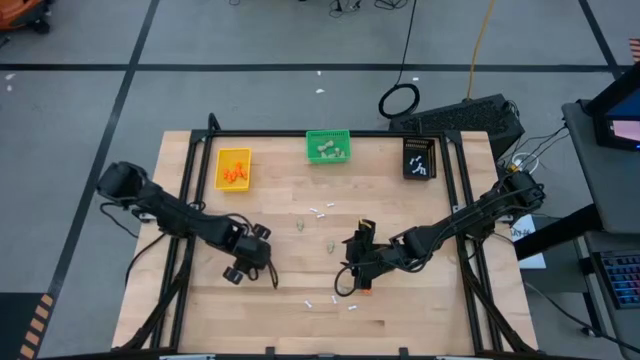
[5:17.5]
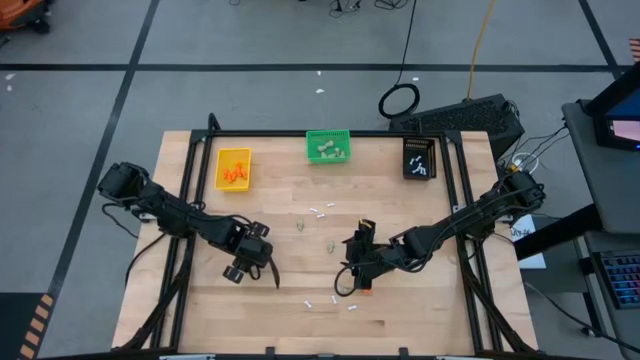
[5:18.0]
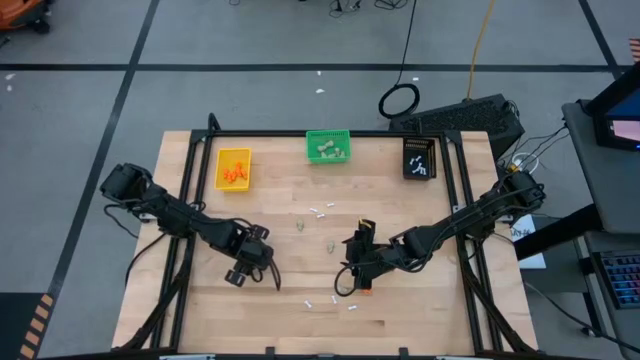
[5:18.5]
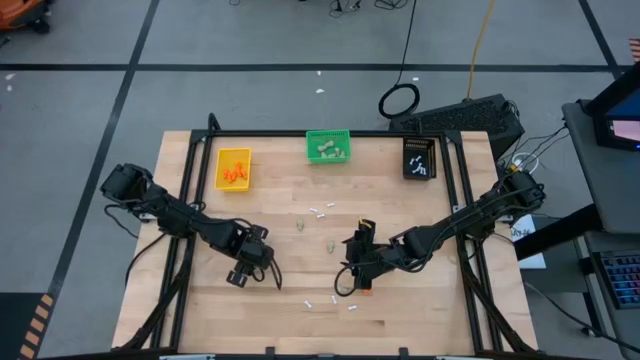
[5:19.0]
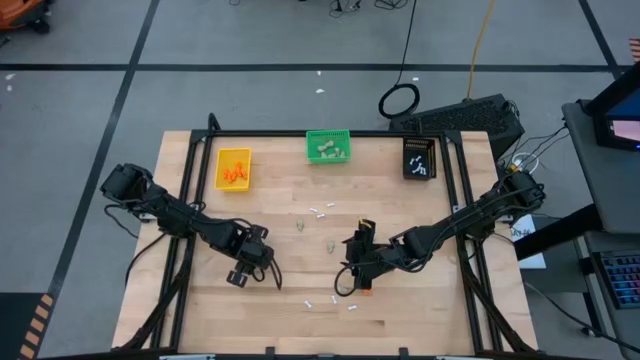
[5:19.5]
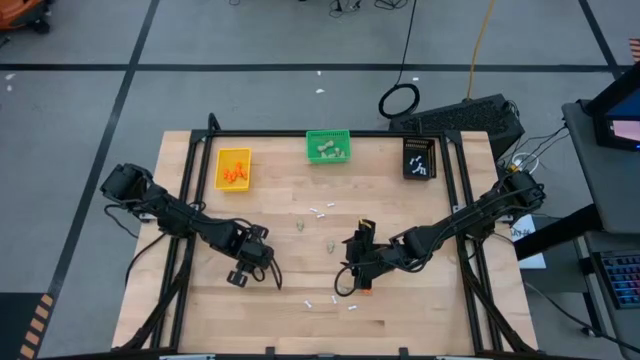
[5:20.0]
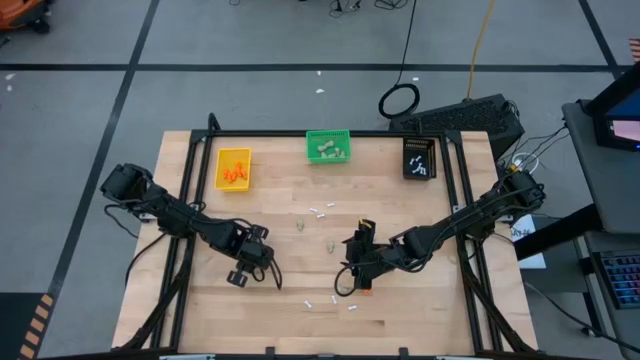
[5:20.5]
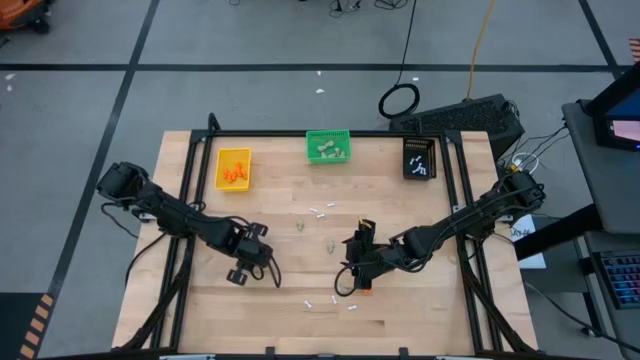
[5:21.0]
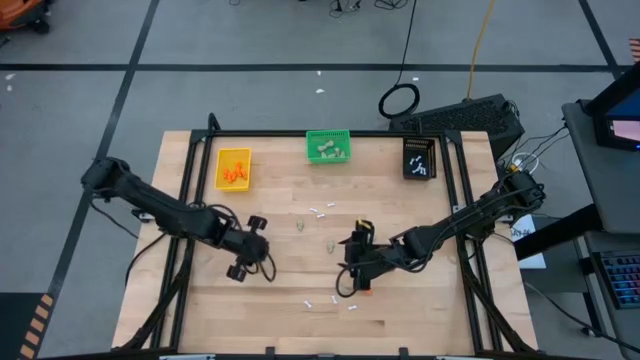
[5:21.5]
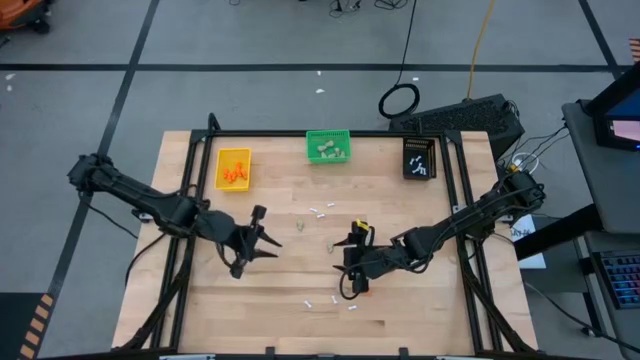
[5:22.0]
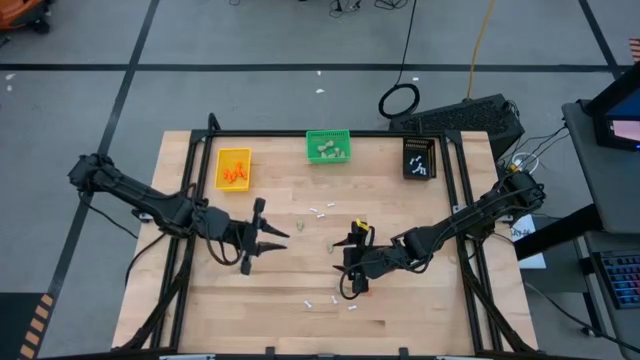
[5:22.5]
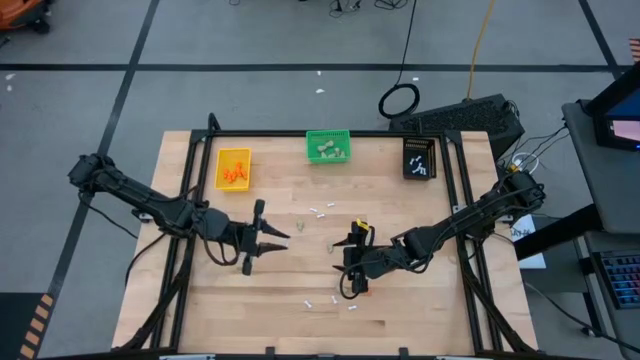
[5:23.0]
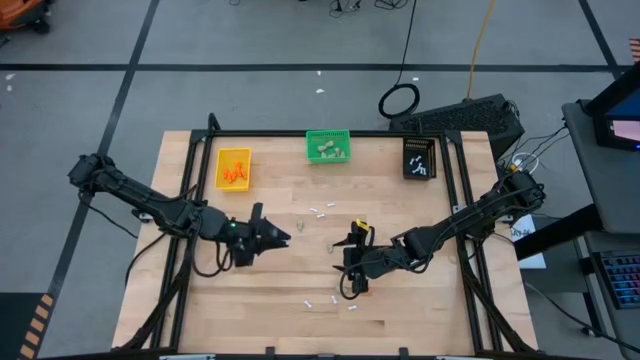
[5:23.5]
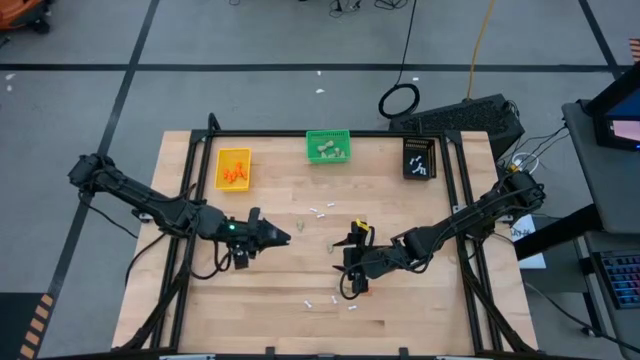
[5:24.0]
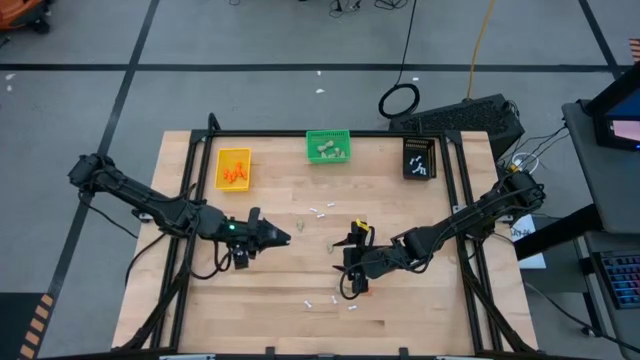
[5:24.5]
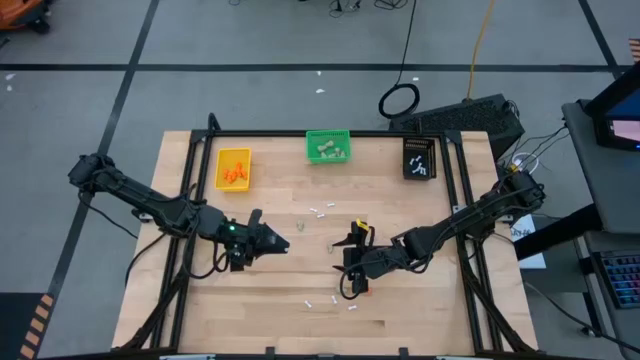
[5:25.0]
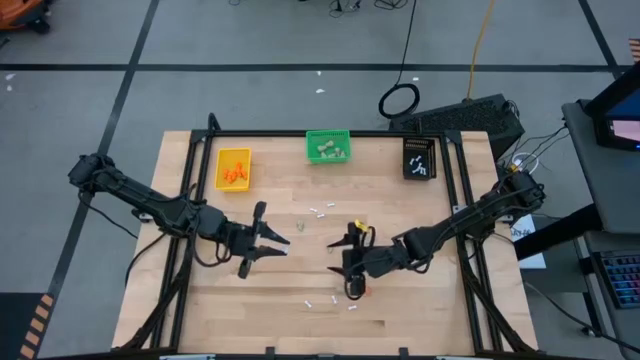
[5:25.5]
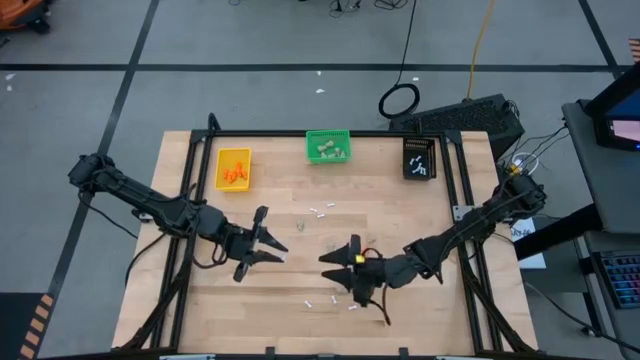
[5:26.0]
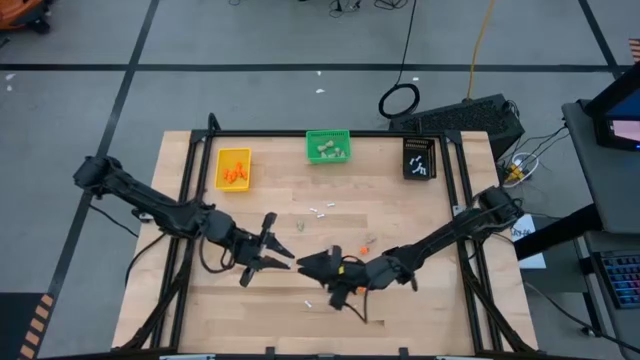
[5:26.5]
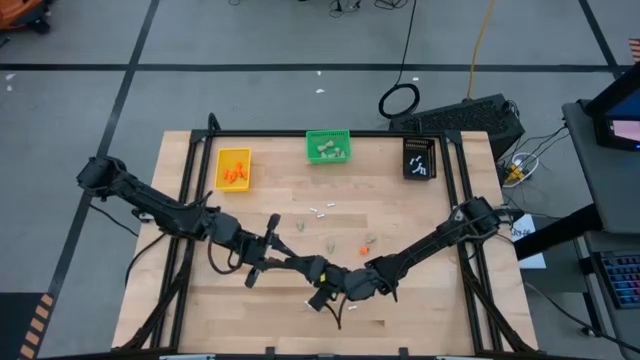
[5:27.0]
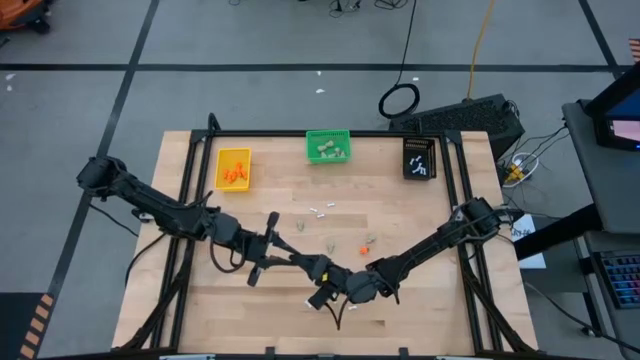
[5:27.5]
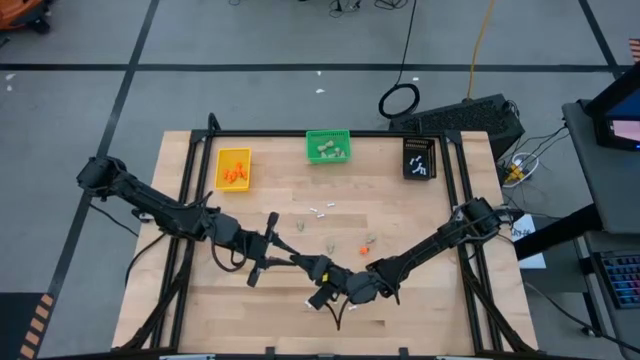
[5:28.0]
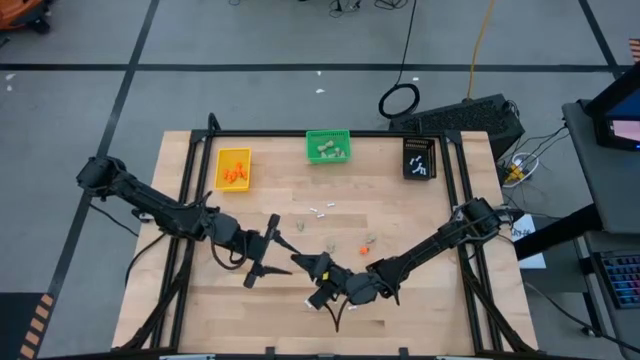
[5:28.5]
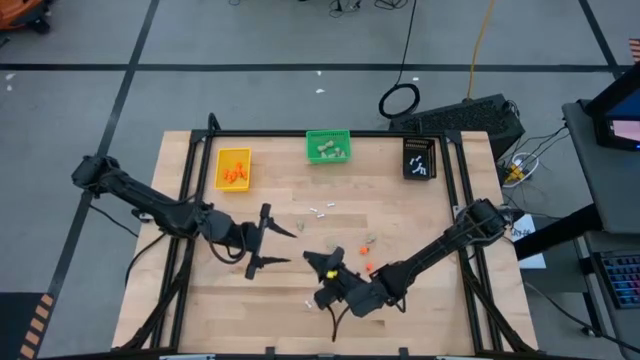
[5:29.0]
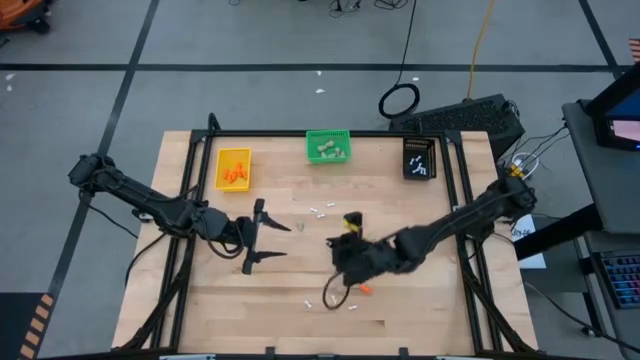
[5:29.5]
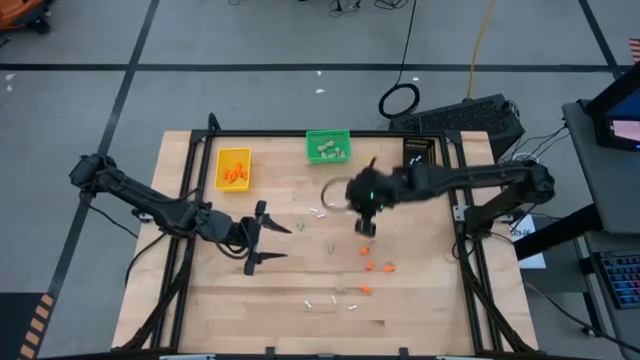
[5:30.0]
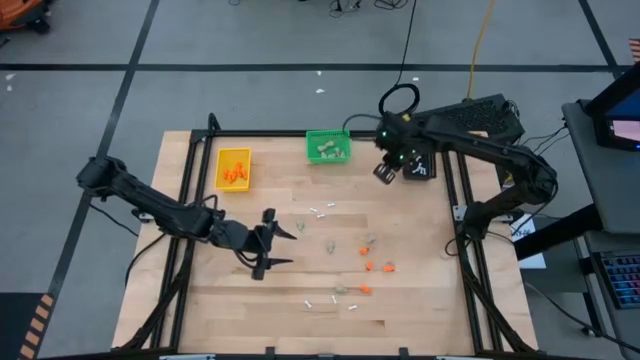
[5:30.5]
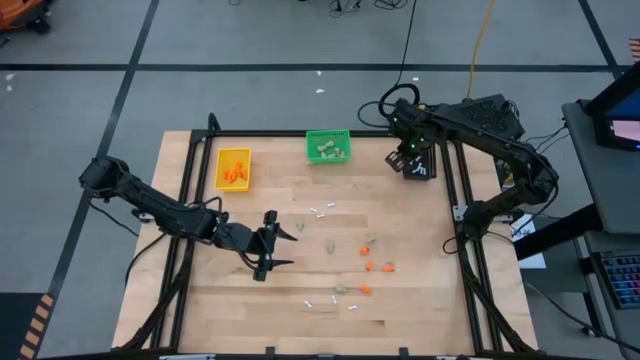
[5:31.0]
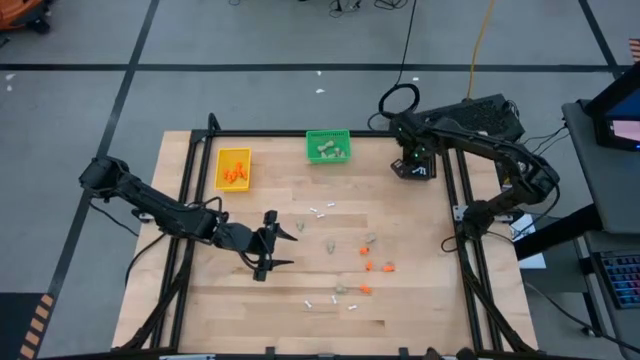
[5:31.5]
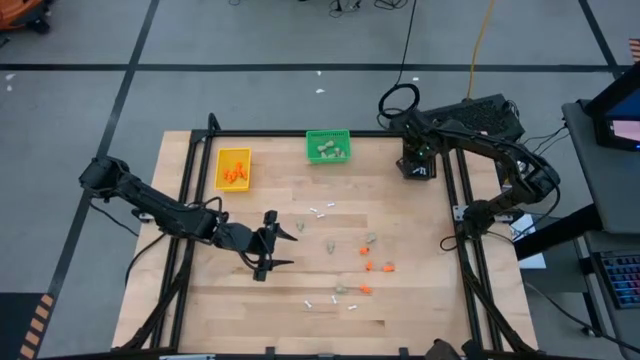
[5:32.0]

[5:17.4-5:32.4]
Task: Sort Halloween decoration
Put the white bone toy into the black bin

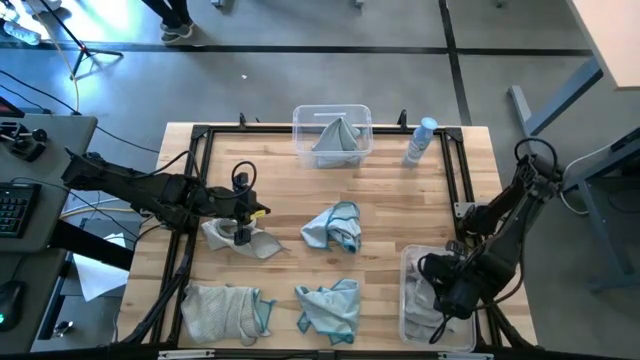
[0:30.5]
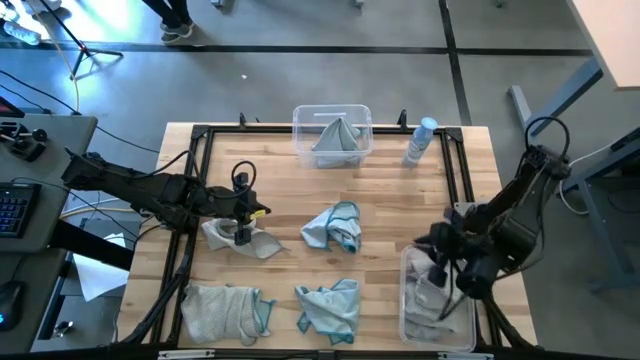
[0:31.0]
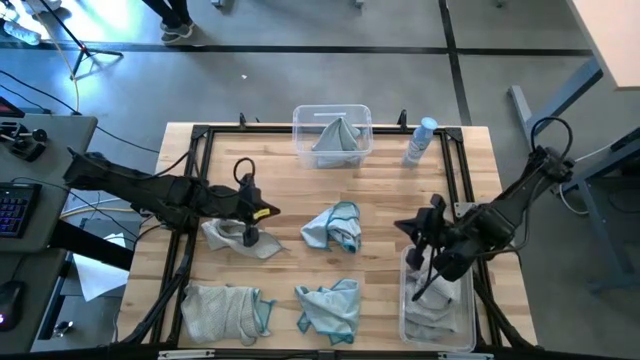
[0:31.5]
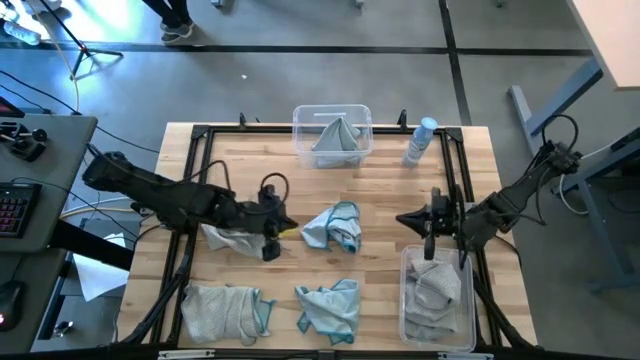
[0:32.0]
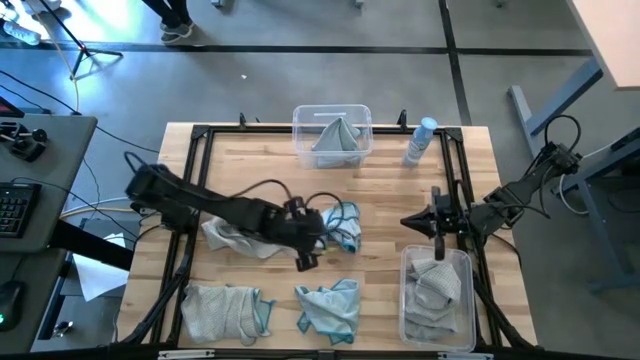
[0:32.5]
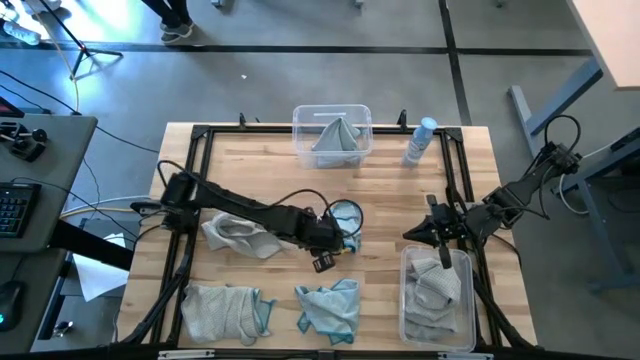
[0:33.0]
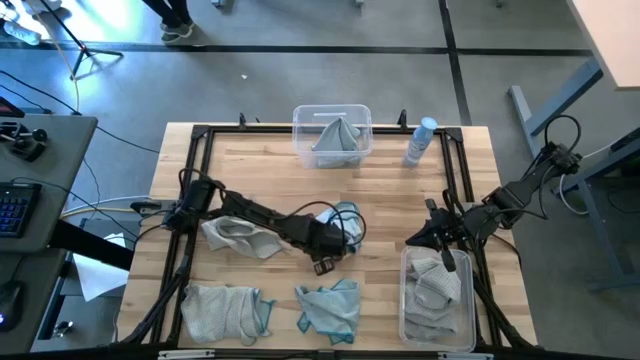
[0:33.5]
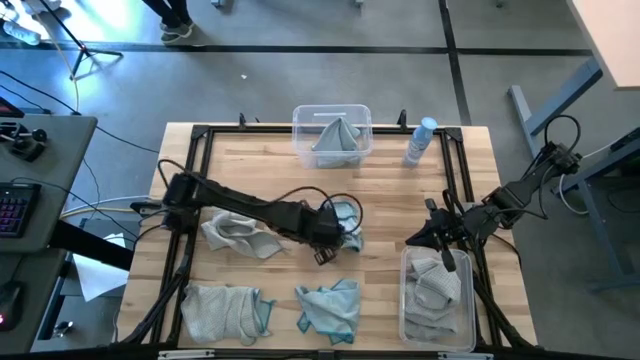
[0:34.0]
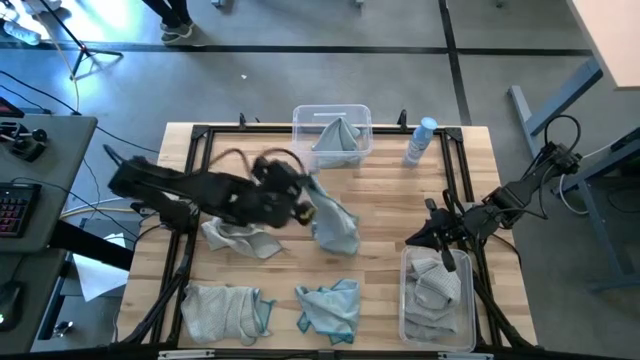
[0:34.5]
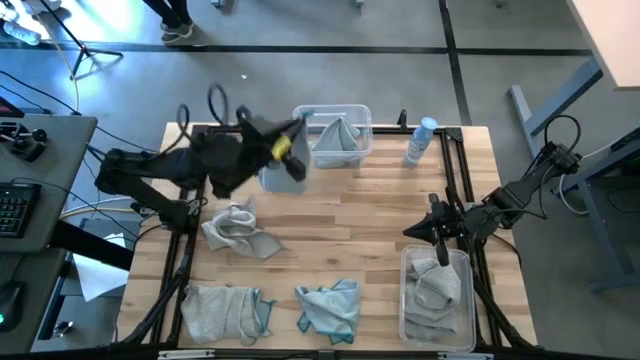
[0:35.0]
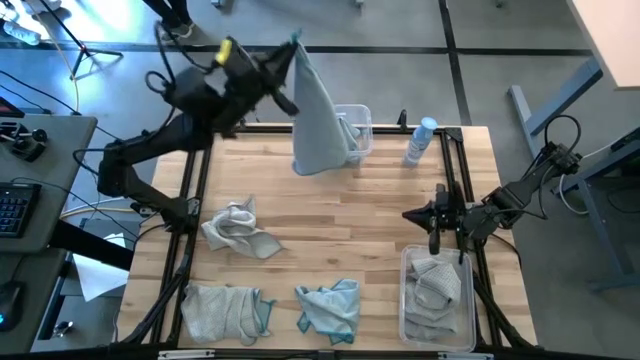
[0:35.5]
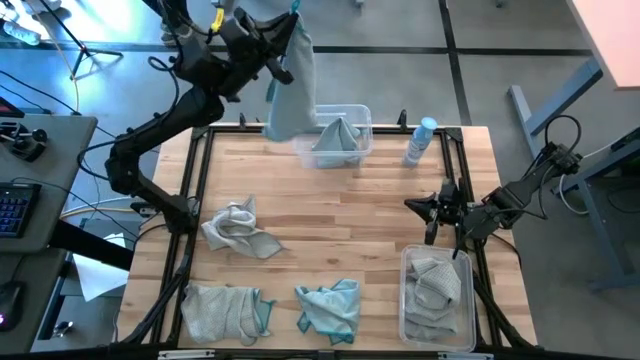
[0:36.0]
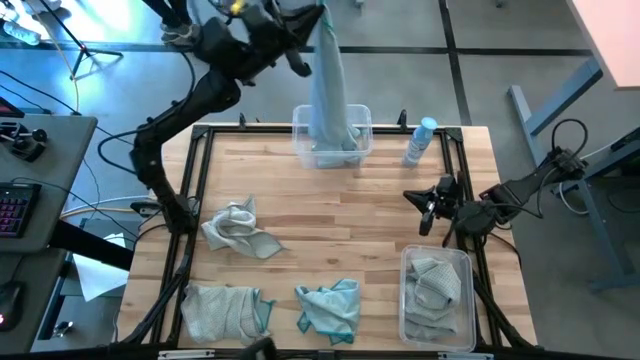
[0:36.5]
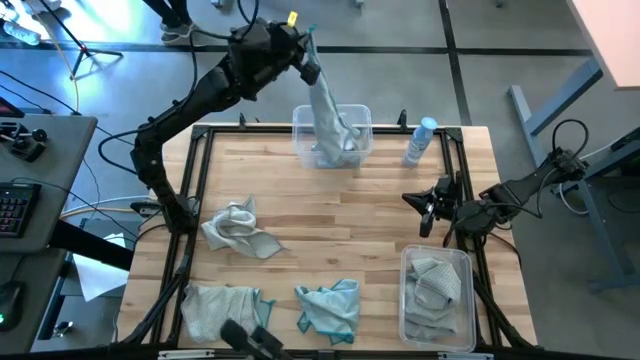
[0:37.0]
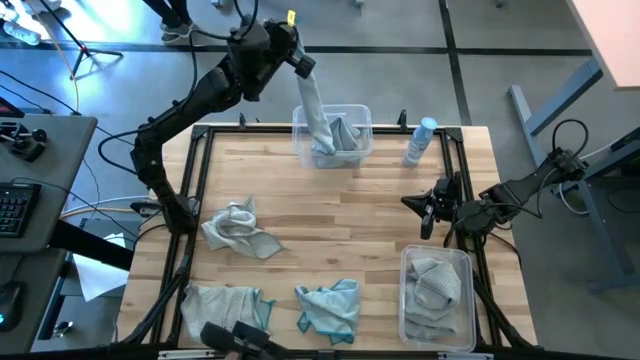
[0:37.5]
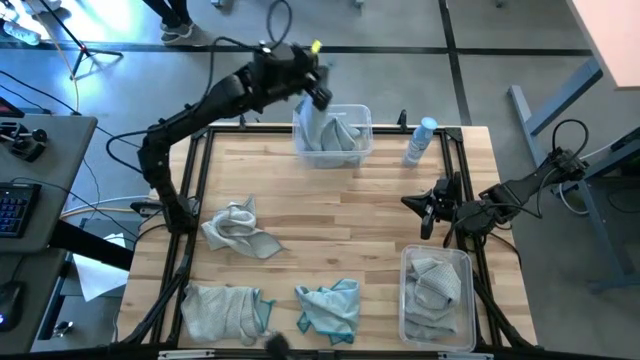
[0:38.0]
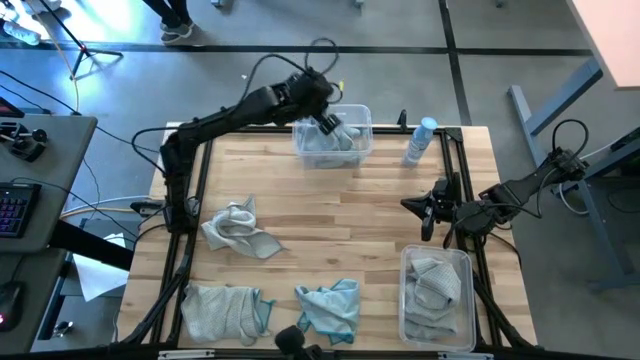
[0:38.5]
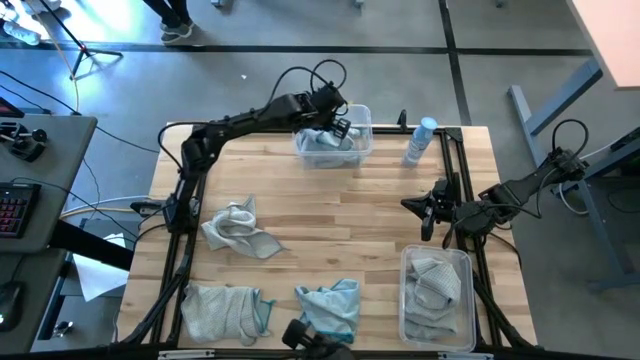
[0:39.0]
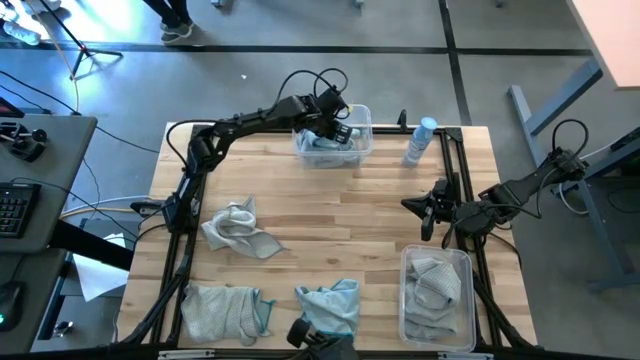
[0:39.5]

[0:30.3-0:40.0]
Task: Sort microfiber towel by color & place in baskets
Put the blue microfiber towel into the top transparent bin
